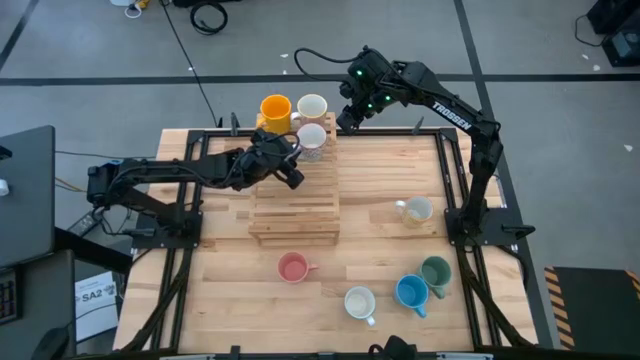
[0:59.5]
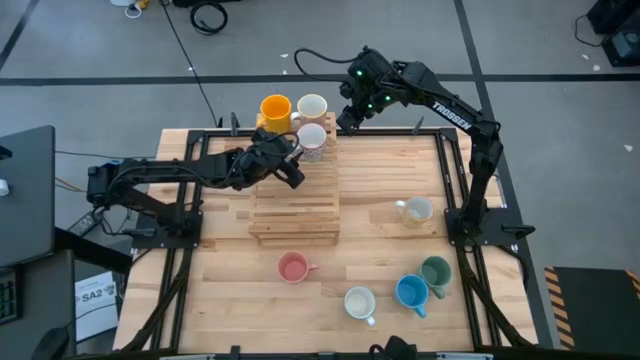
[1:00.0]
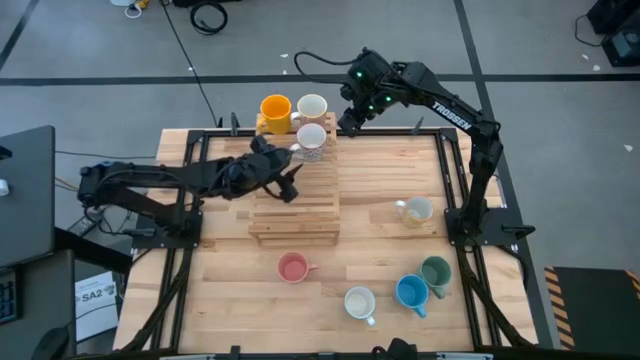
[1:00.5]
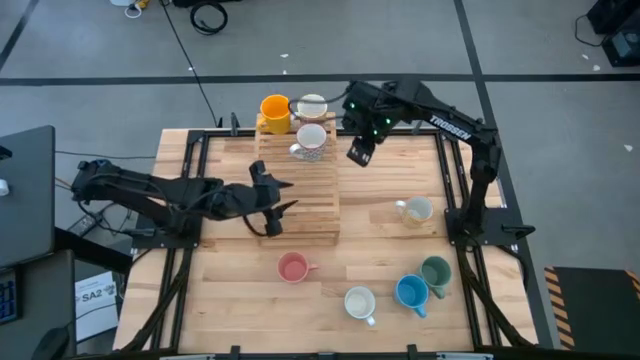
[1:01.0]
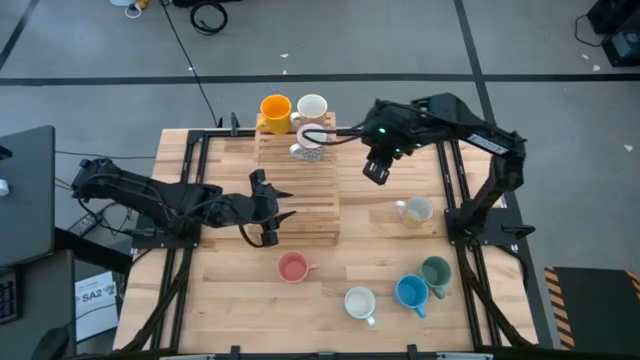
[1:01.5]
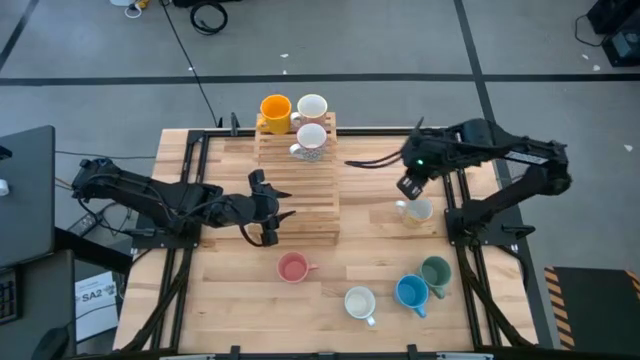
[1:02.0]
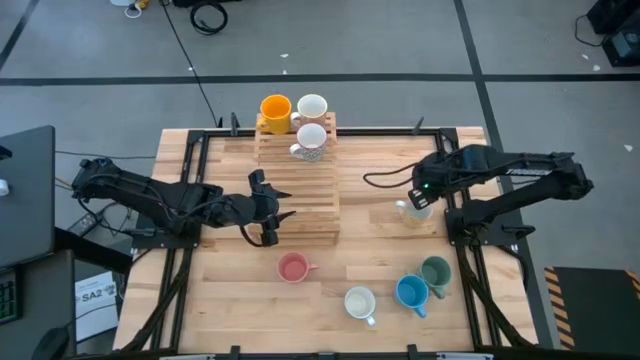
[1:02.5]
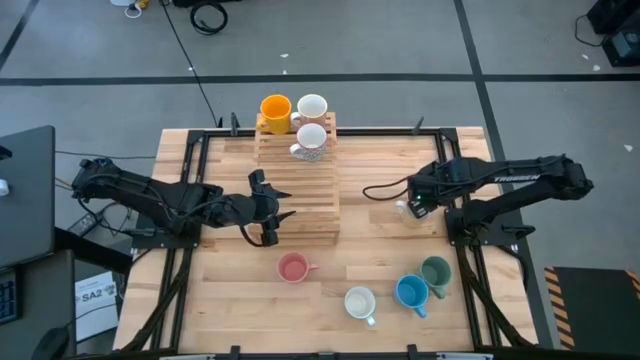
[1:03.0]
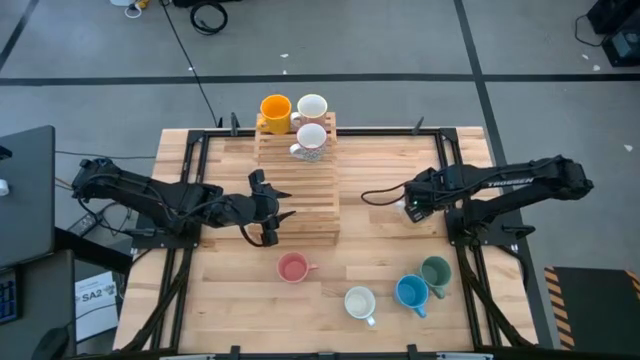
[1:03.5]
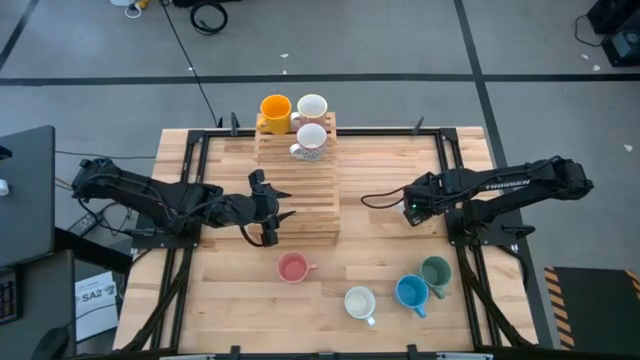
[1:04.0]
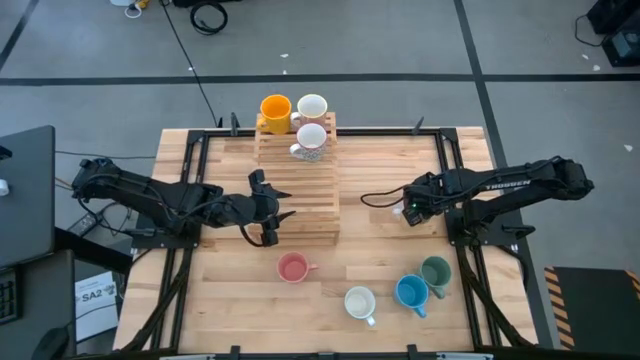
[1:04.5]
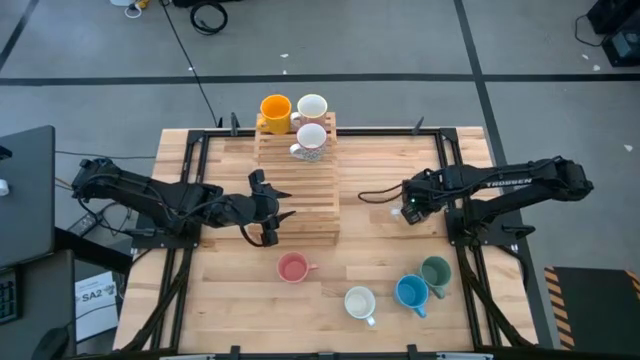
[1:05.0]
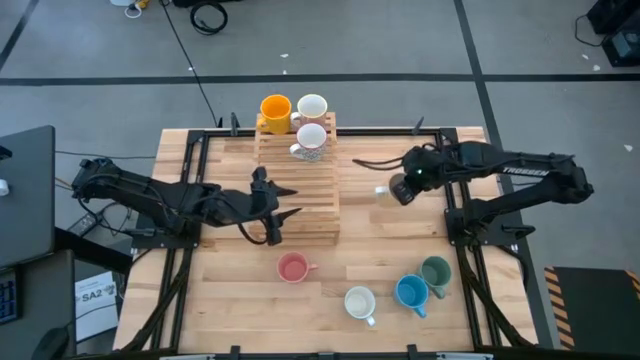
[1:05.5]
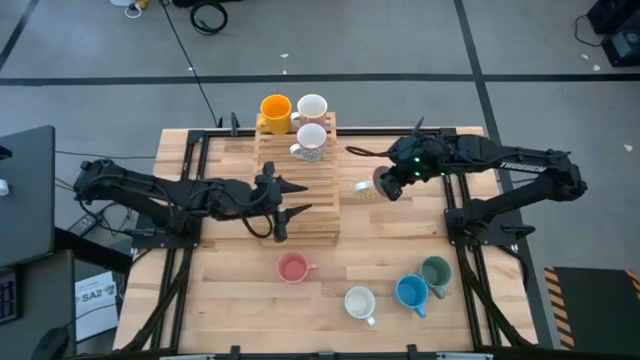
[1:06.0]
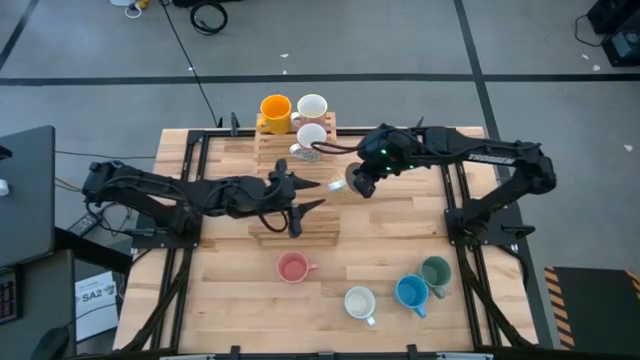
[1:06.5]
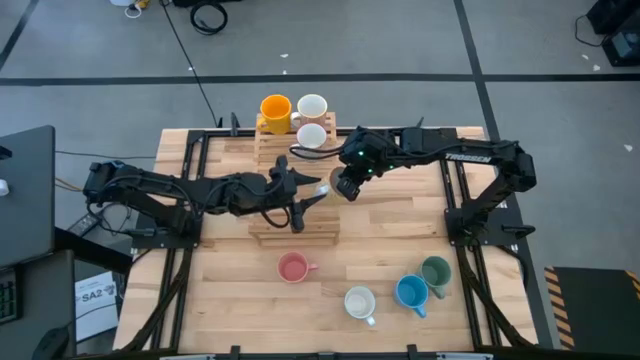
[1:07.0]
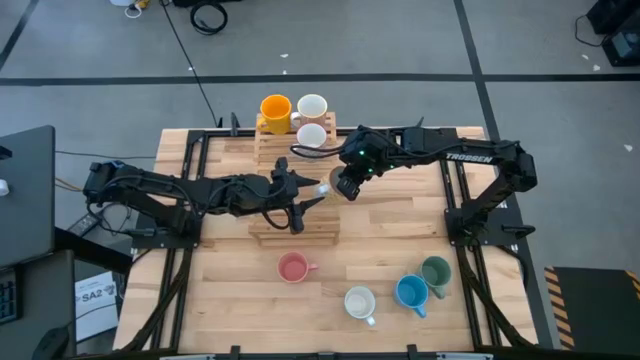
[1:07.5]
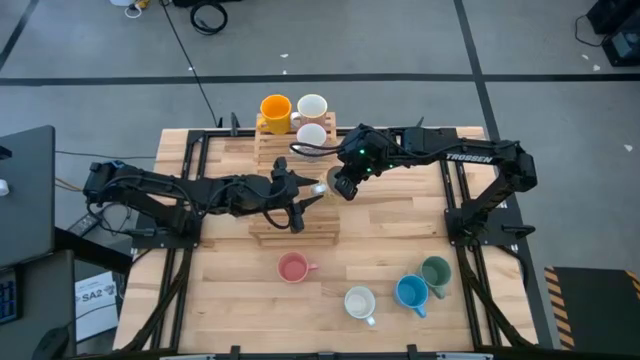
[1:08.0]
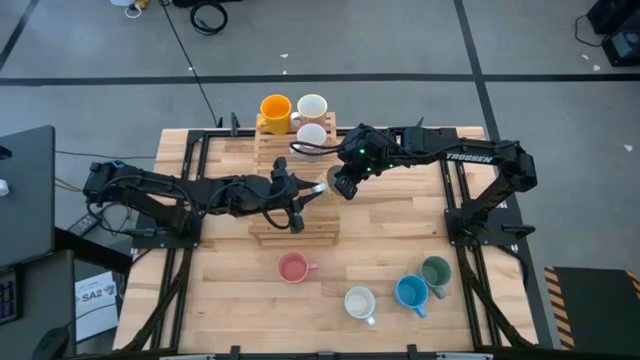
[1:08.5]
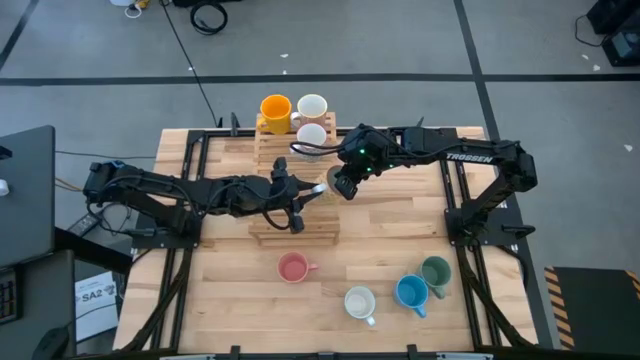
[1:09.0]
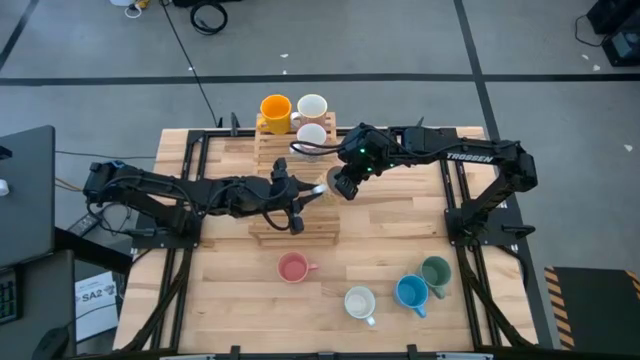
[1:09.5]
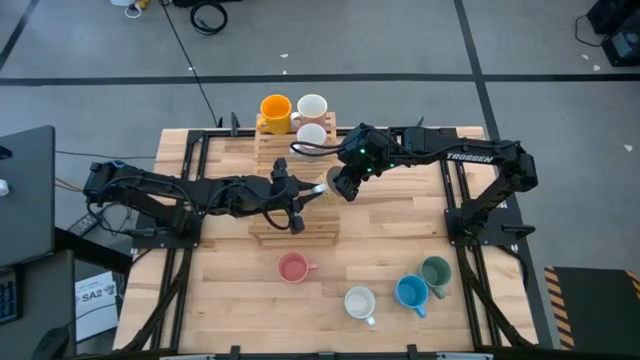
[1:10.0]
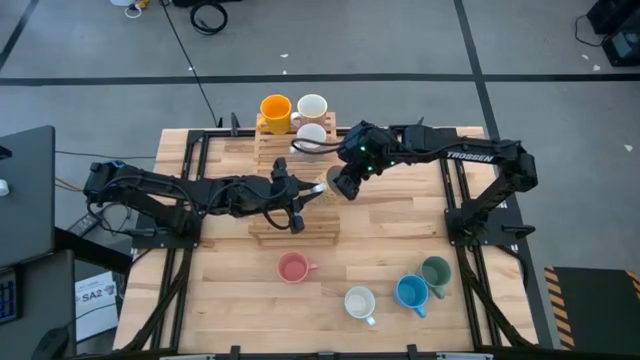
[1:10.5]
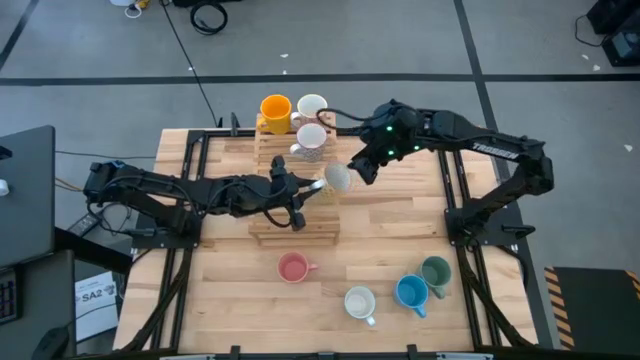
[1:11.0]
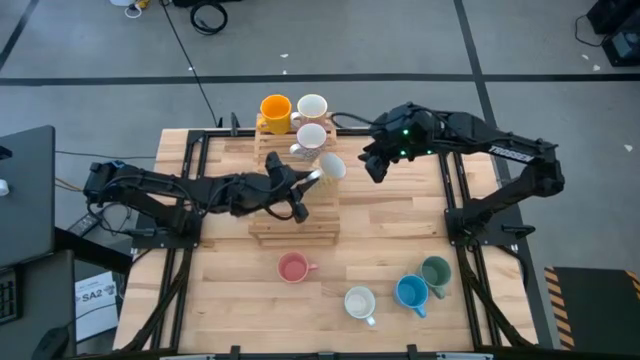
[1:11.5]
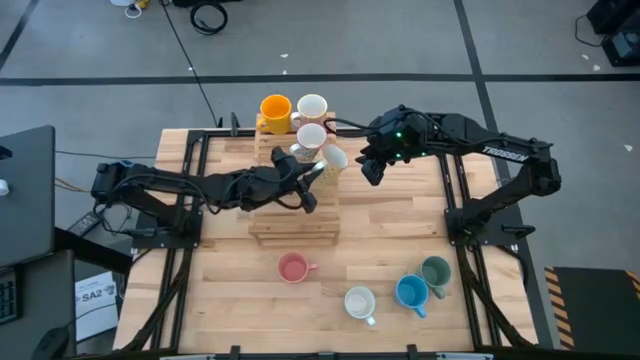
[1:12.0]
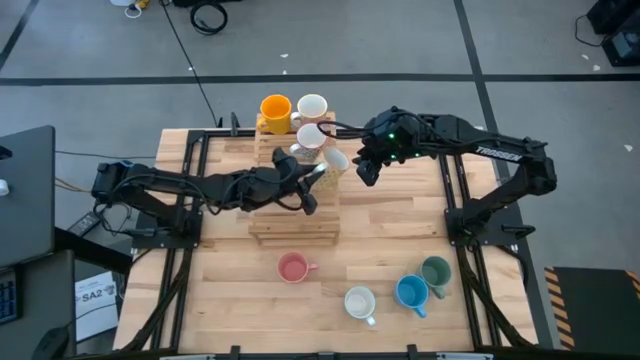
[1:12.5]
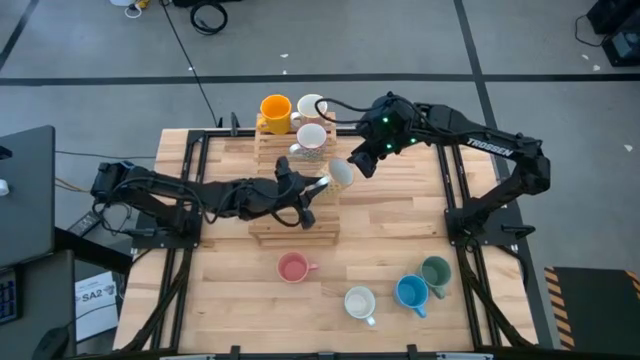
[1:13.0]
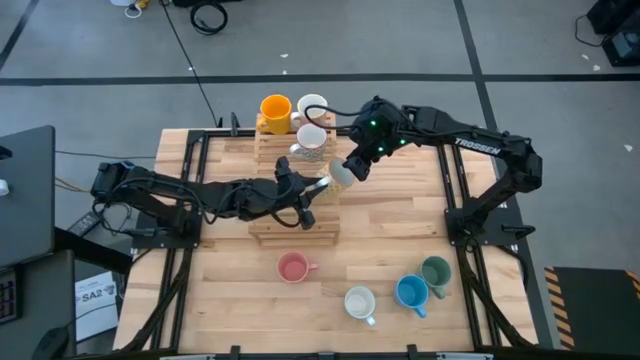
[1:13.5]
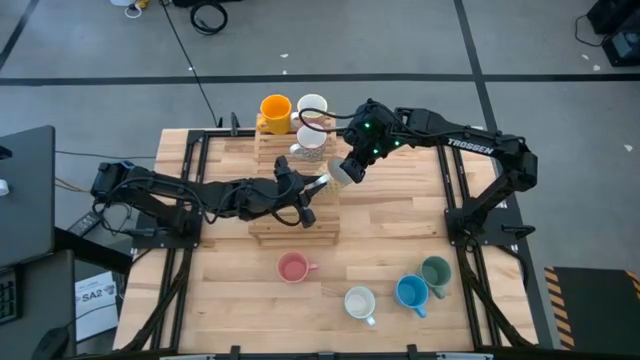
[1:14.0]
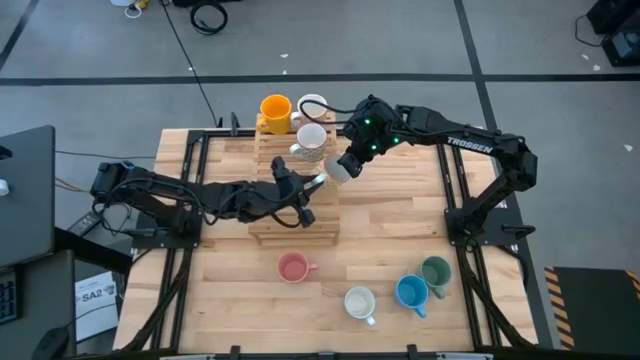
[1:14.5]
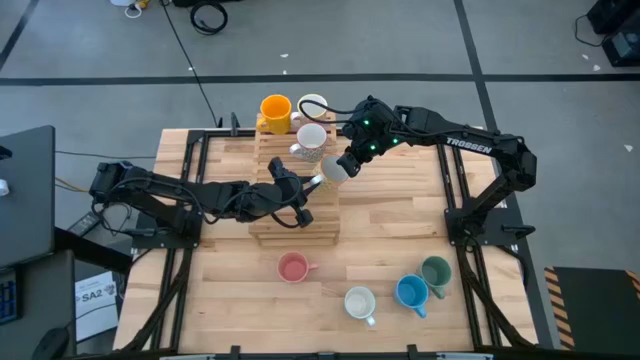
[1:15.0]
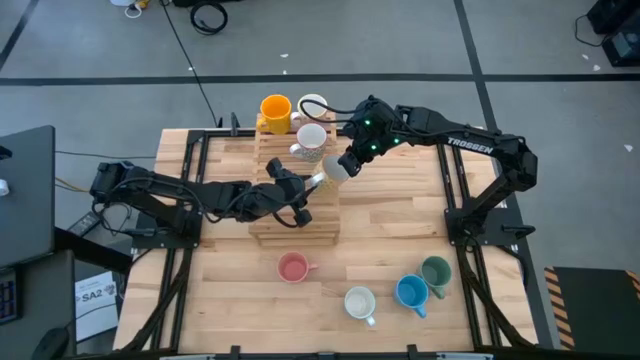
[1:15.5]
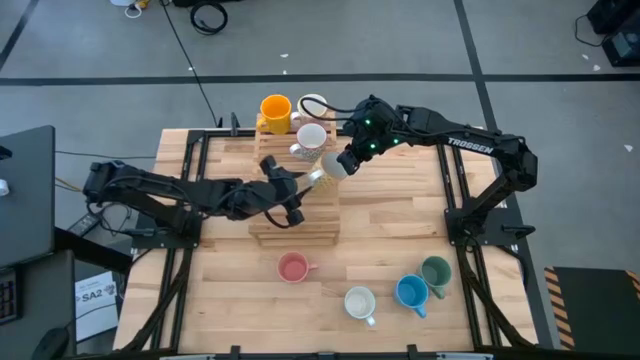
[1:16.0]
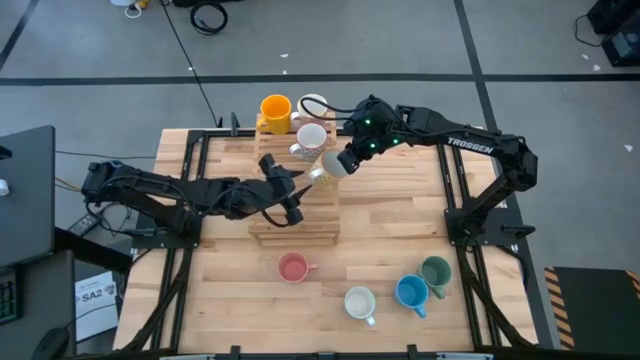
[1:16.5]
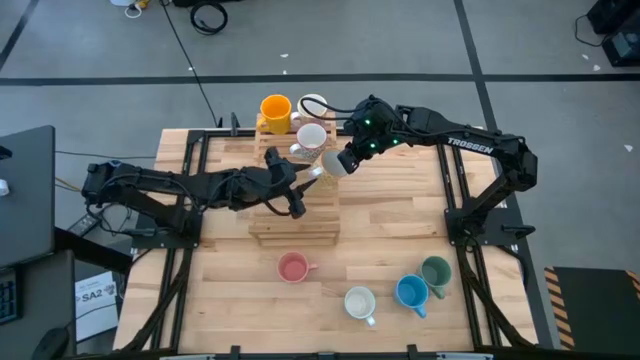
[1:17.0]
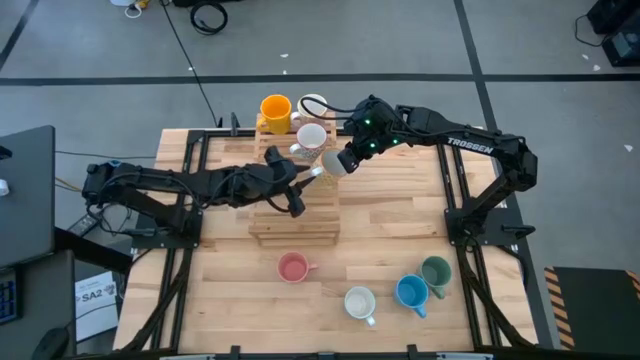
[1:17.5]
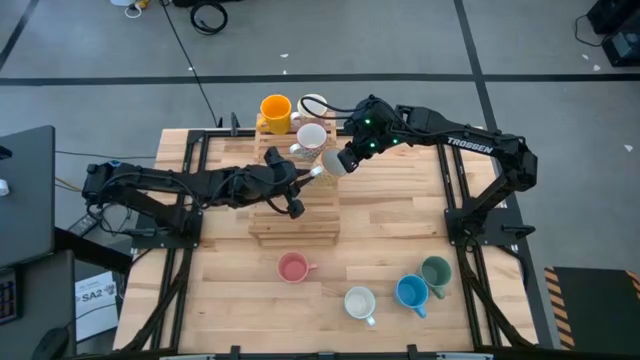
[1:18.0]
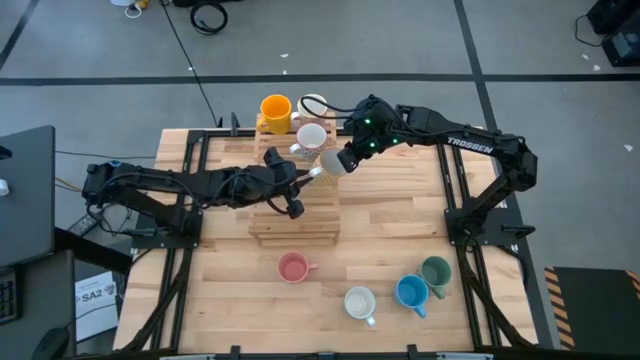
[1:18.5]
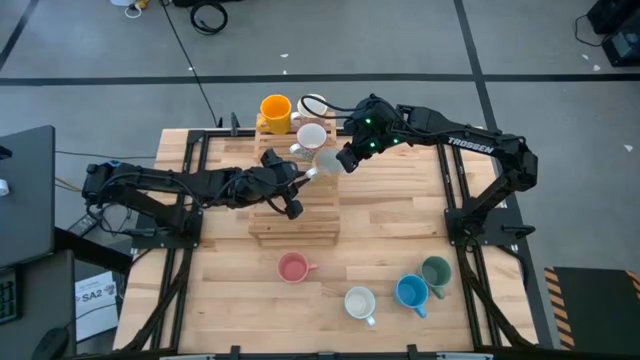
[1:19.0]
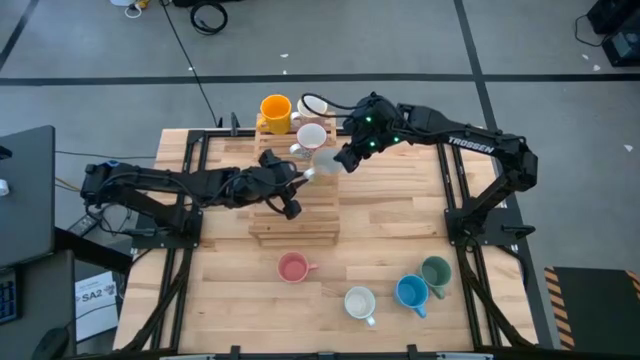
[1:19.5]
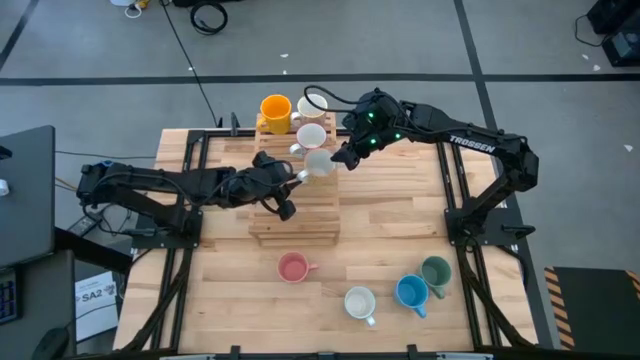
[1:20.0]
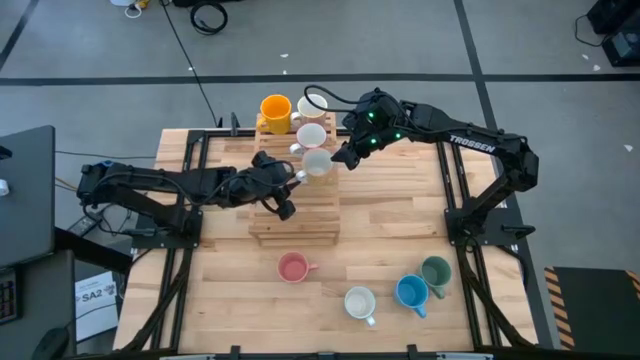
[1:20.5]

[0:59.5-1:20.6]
Task: Place coffee mugs
Put the orange mug on the shelf
